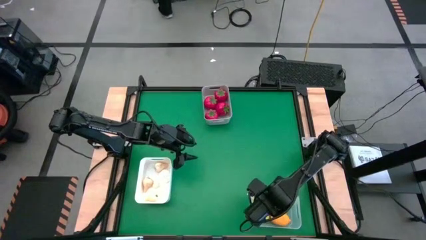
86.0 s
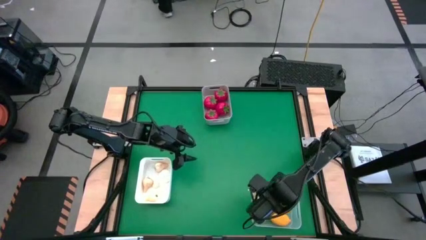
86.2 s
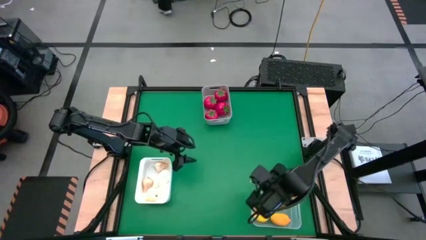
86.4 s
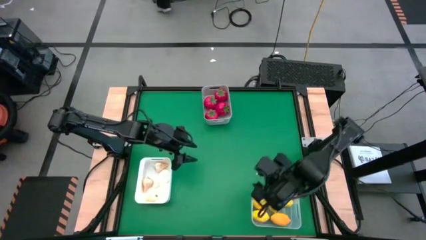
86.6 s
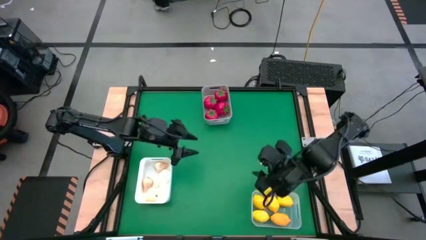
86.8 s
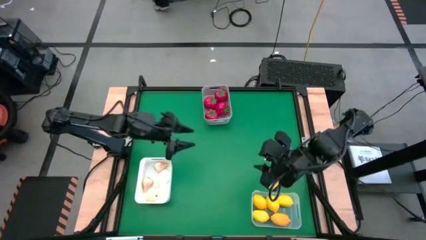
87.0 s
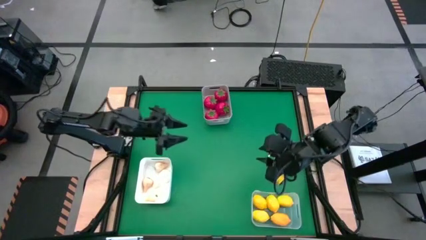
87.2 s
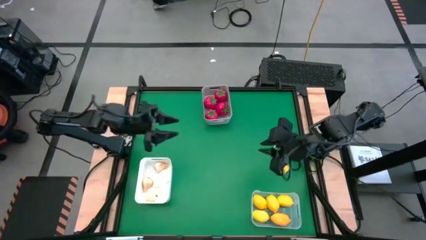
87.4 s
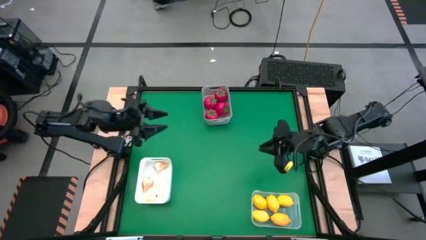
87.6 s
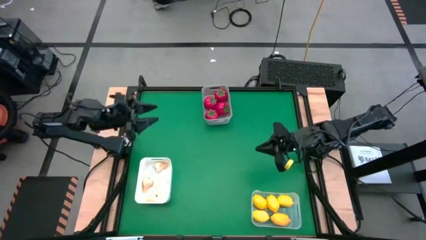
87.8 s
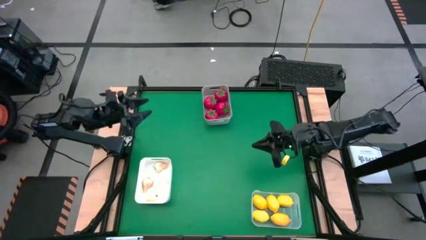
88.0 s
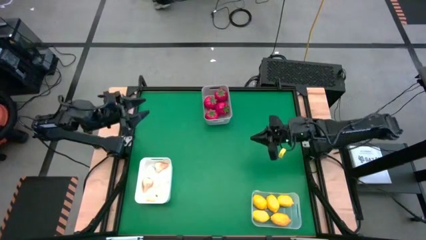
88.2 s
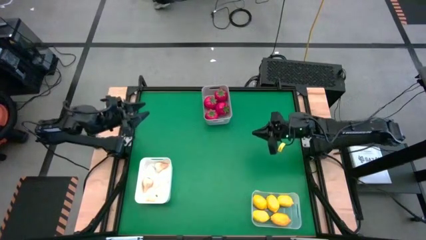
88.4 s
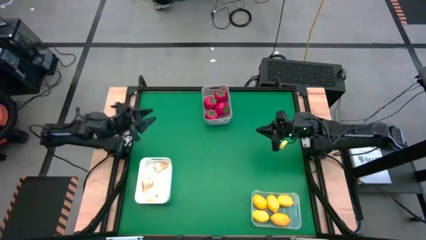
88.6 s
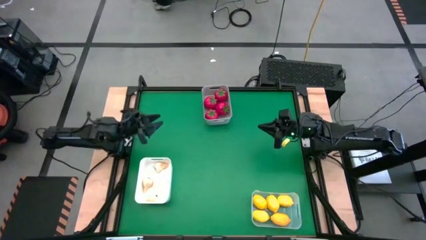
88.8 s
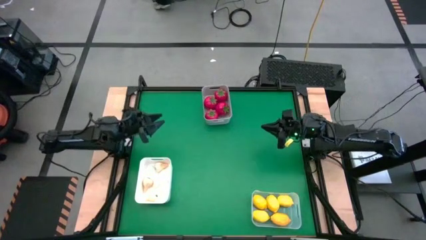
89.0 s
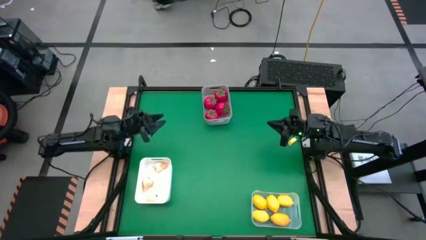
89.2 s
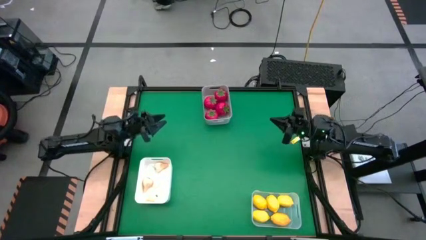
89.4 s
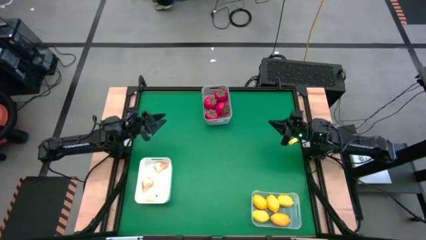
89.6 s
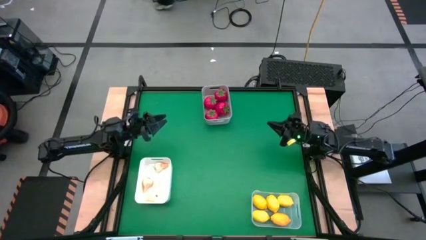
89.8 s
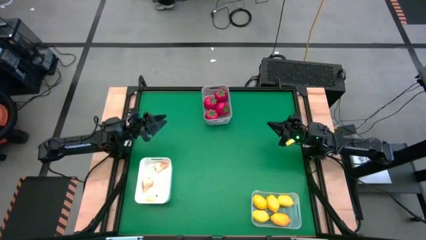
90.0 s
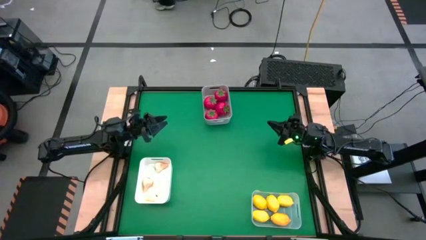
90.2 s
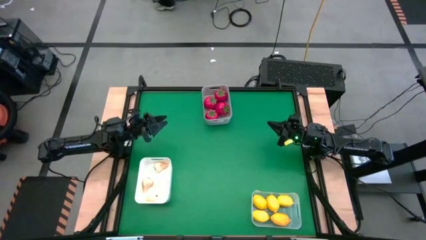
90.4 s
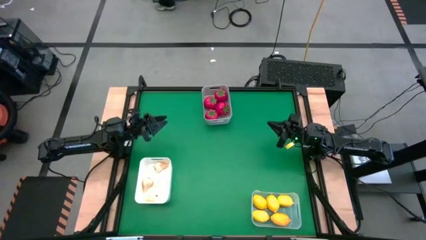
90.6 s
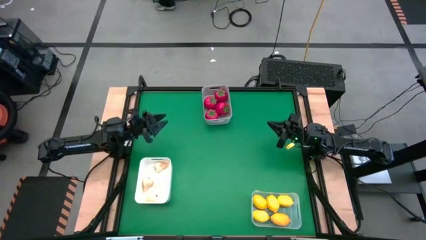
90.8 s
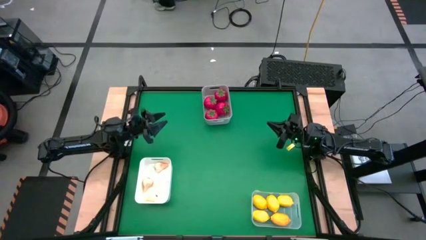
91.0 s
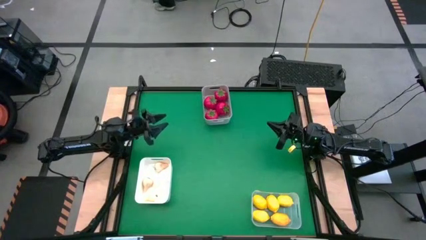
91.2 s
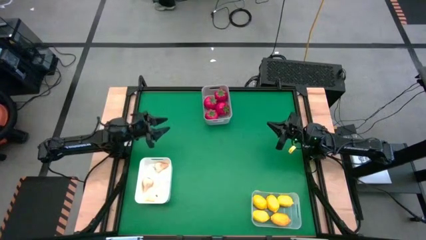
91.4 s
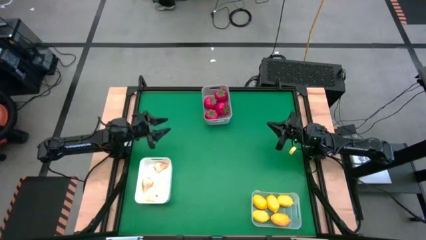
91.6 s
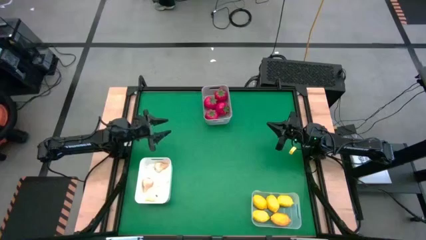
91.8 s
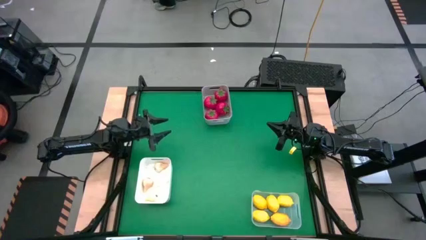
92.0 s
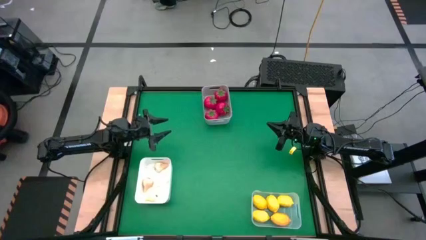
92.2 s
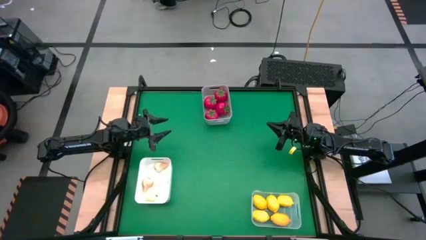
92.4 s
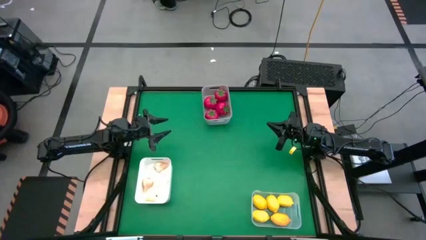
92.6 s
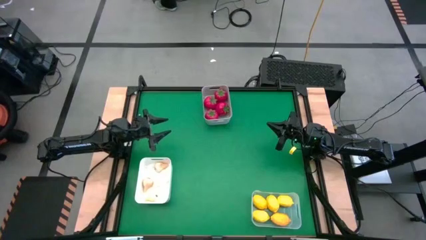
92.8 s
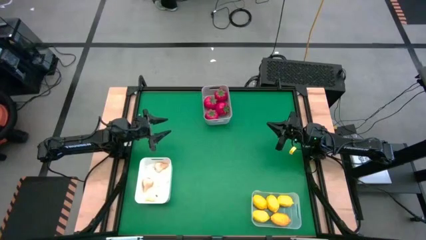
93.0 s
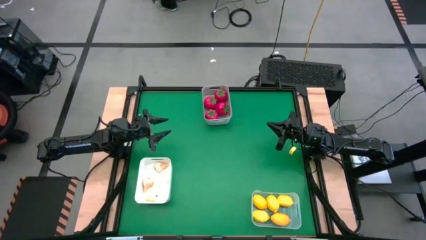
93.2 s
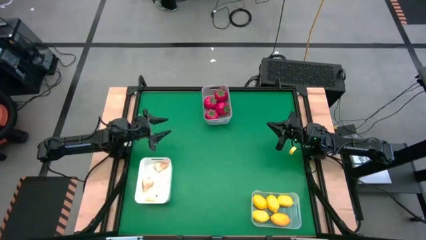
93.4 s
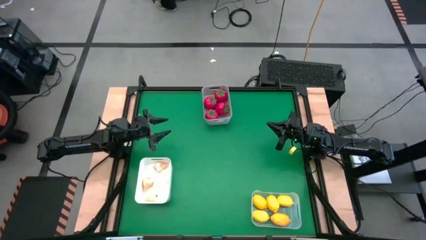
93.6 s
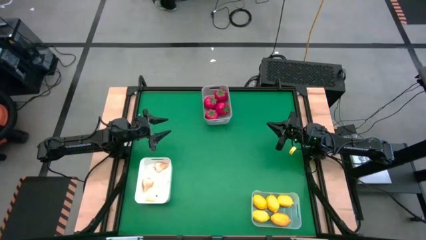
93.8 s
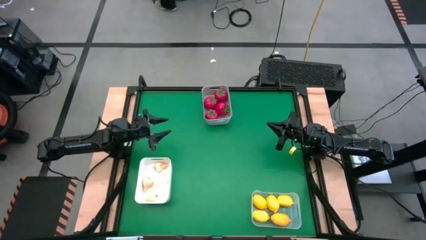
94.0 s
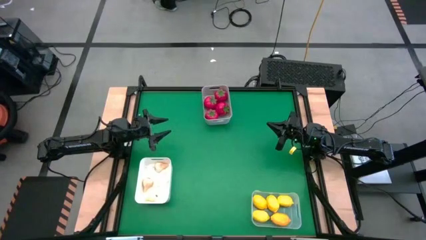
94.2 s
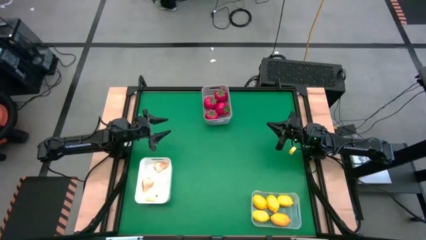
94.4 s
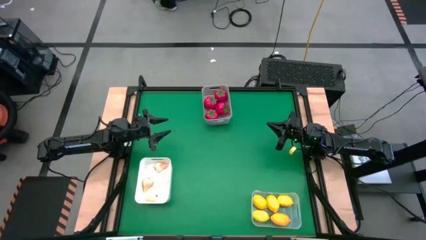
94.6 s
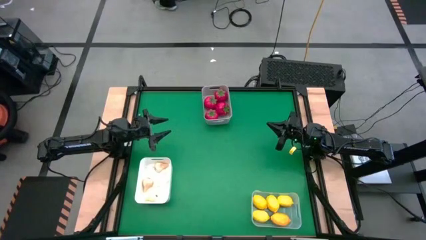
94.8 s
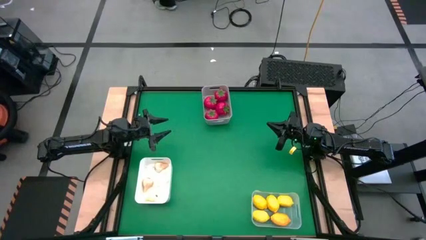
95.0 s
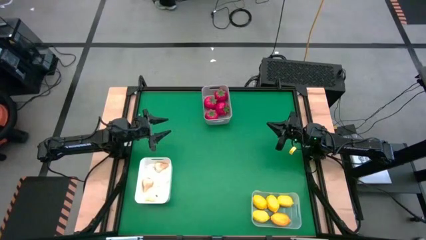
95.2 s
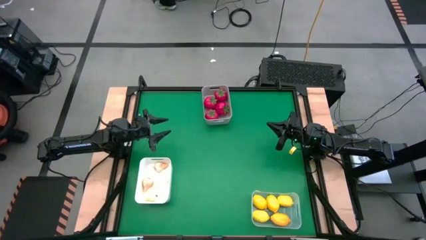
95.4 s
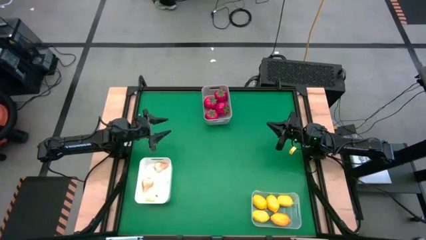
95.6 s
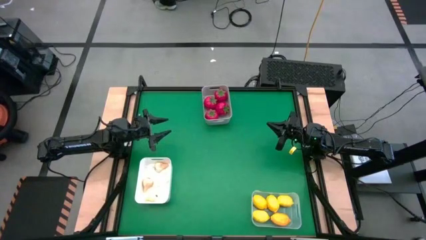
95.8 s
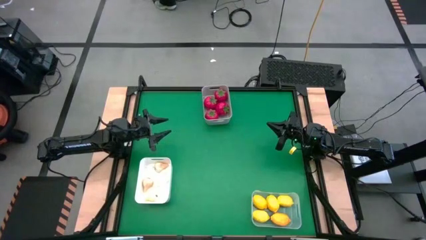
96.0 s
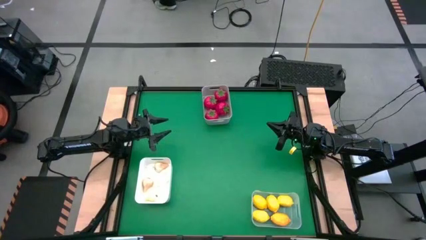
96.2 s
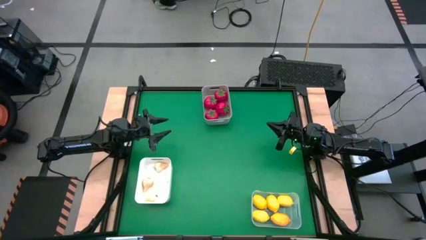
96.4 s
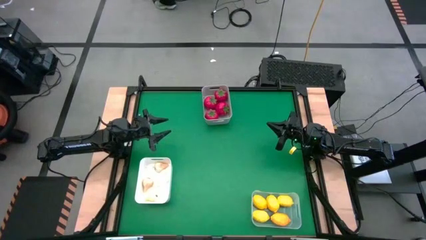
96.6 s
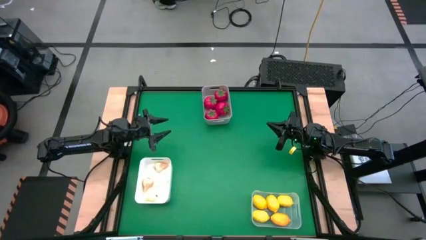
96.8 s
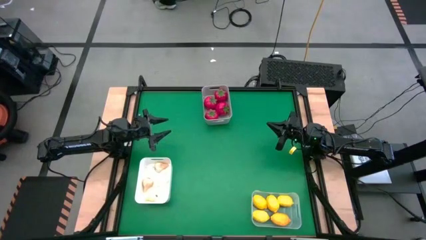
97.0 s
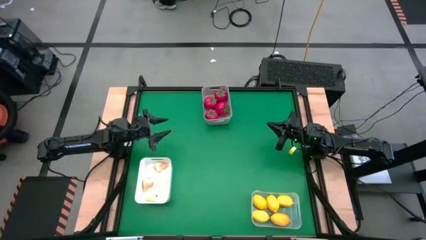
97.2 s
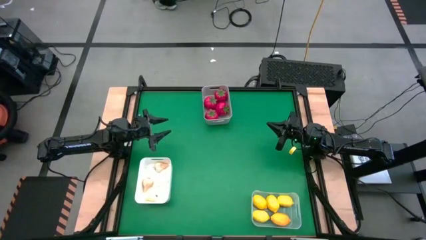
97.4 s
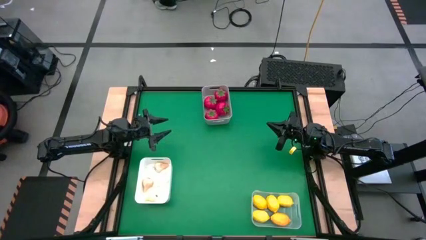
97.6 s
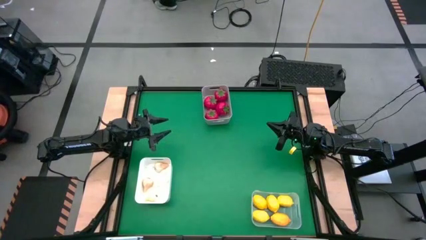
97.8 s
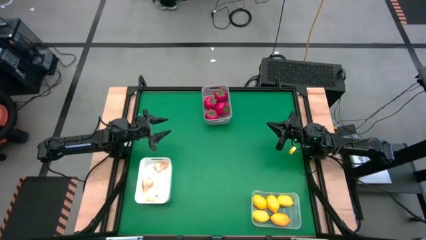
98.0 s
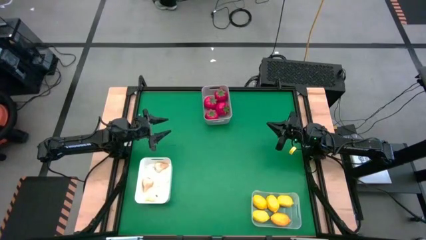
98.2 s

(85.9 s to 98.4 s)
Task: Sort produce into baskets
Return to Home Position

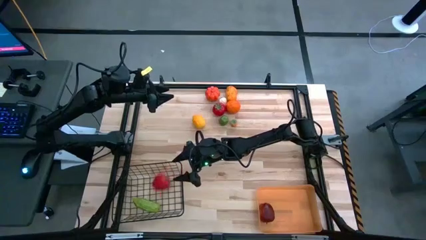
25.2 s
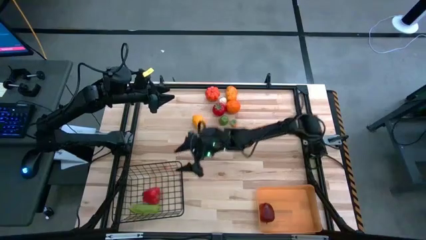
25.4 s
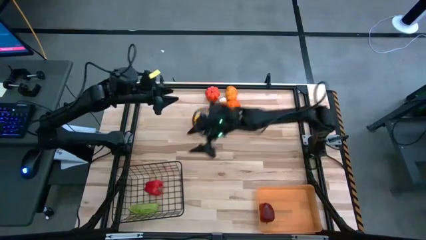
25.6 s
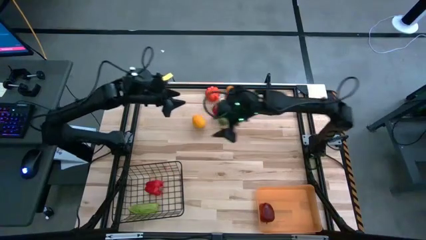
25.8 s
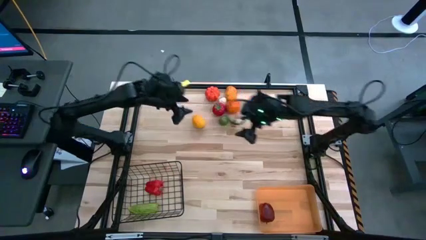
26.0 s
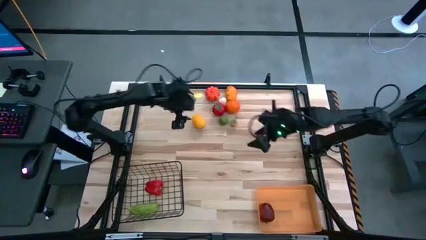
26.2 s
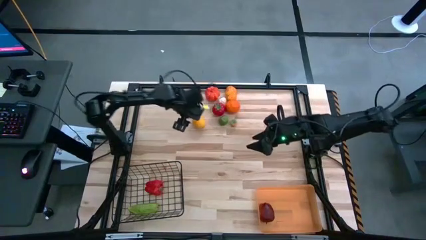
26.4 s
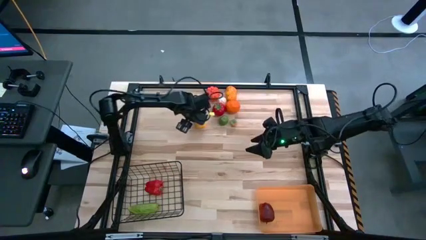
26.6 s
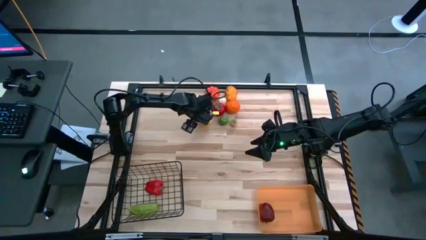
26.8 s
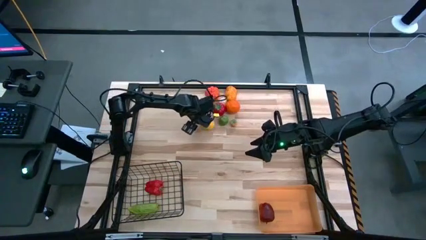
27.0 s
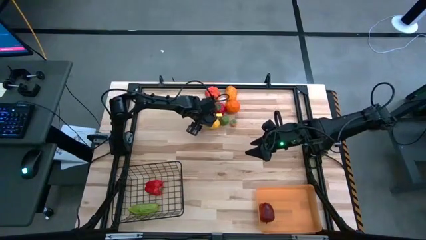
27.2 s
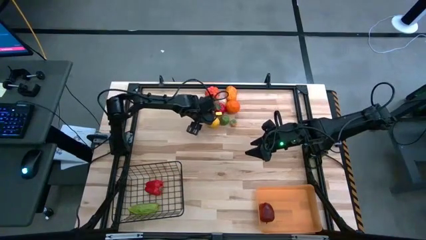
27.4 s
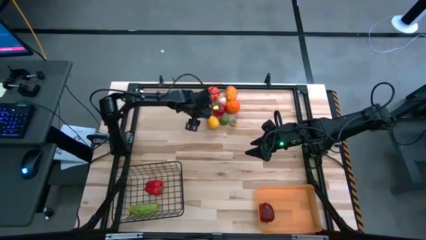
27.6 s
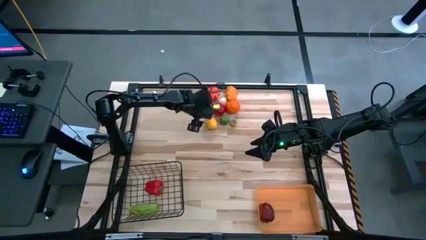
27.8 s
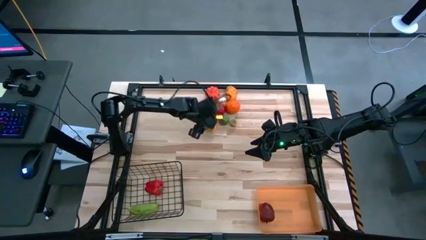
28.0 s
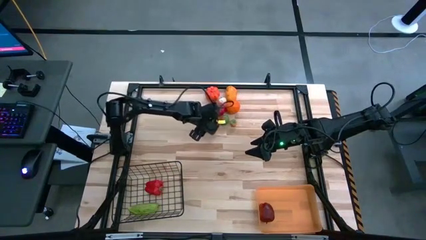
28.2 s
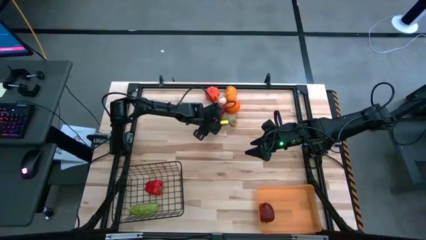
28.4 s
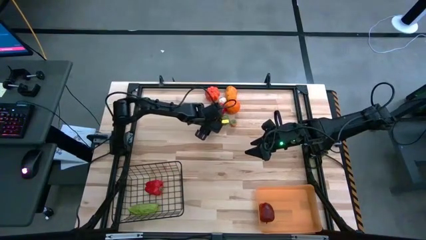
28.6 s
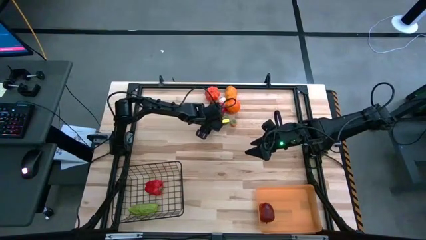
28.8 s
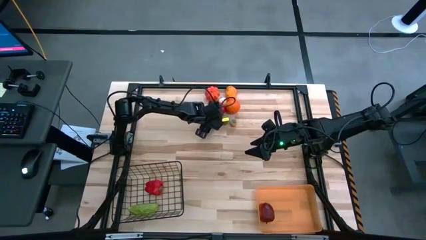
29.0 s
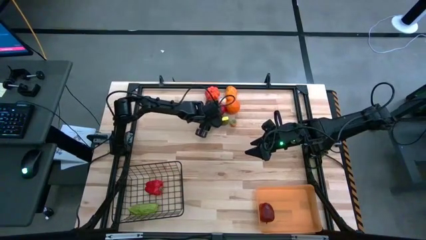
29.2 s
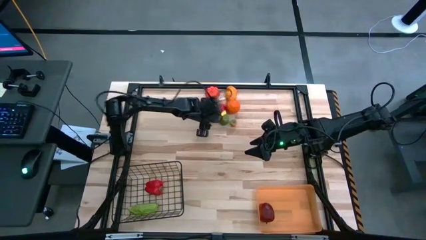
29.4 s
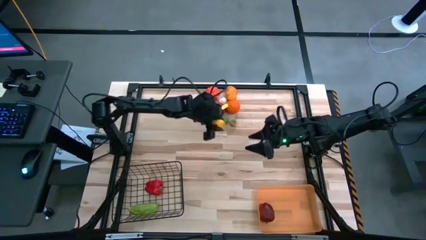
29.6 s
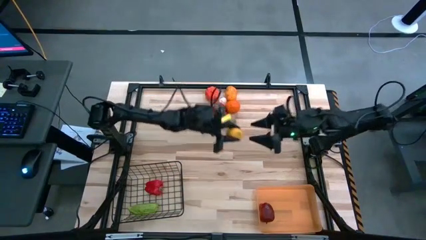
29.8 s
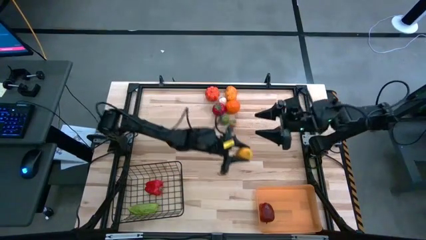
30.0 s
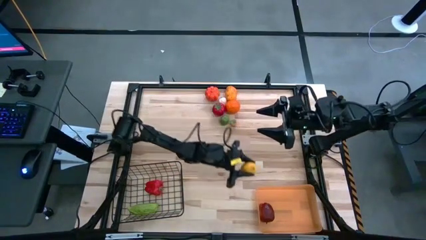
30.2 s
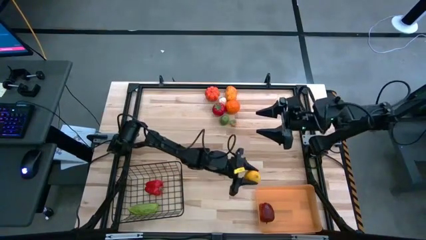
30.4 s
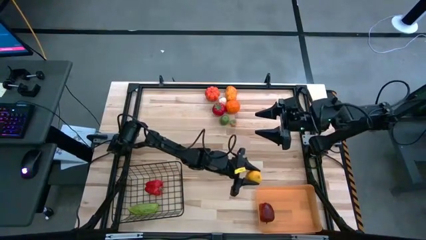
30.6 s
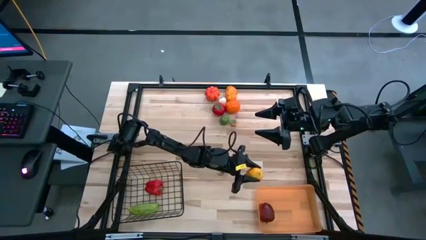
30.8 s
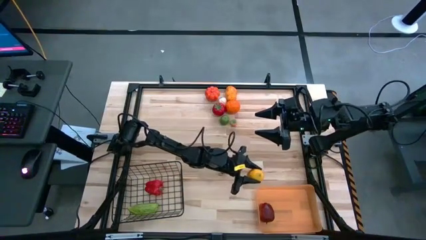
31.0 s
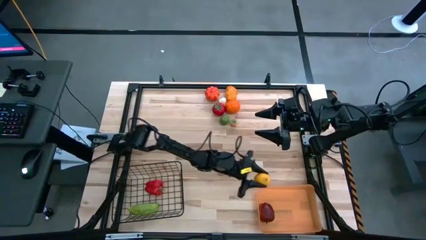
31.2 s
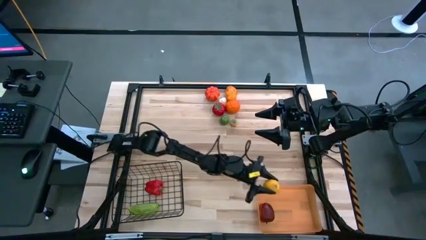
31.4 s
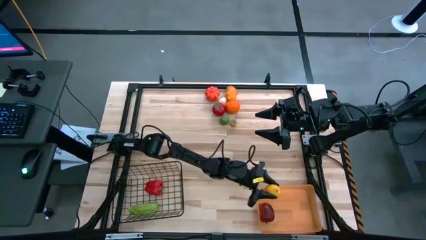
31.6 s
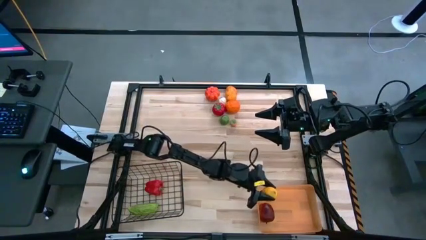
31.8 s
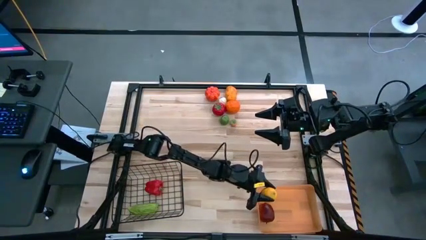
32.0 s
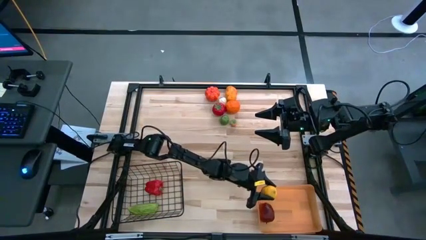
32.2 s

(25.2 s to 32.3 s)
Task: Sort produce into baskets
Put the yellow lemon into the orange bin
